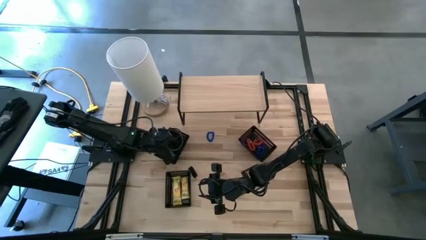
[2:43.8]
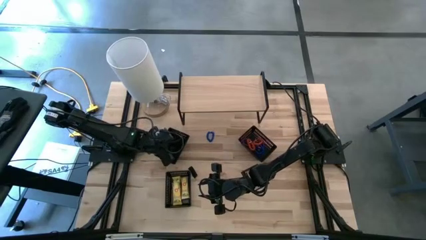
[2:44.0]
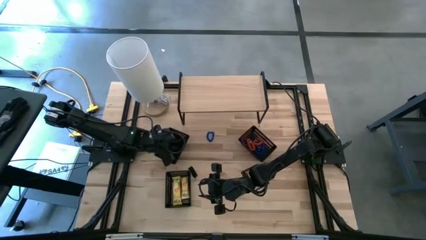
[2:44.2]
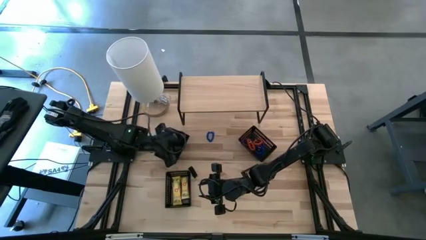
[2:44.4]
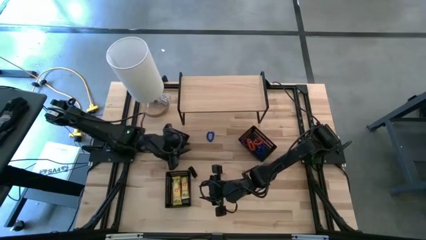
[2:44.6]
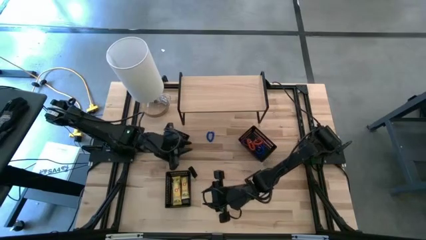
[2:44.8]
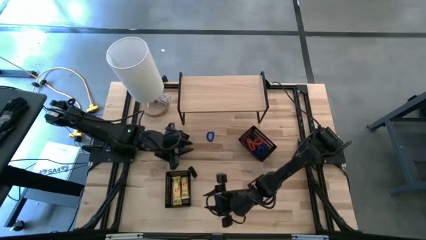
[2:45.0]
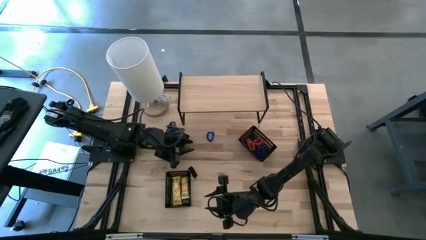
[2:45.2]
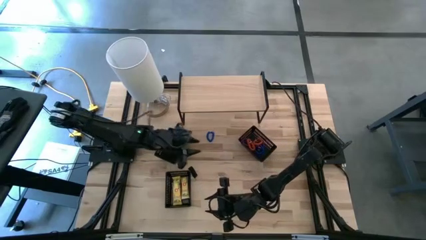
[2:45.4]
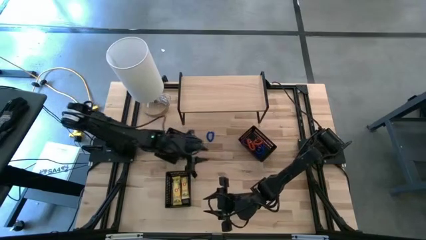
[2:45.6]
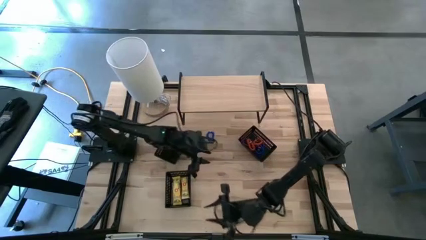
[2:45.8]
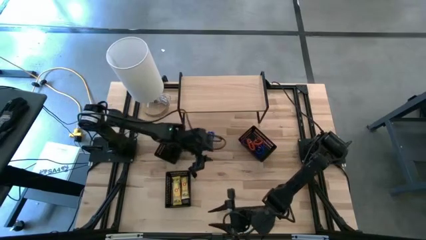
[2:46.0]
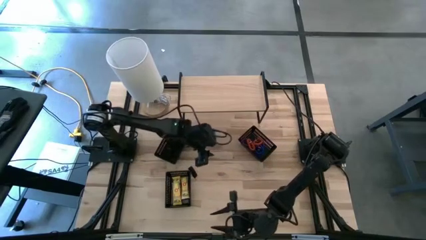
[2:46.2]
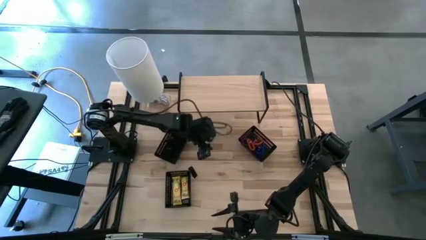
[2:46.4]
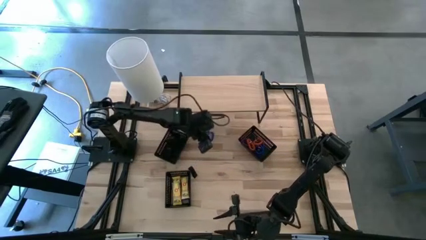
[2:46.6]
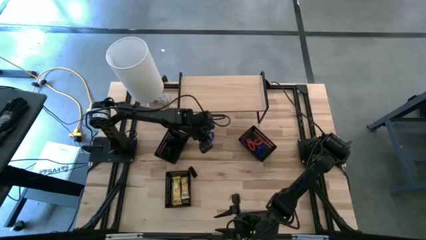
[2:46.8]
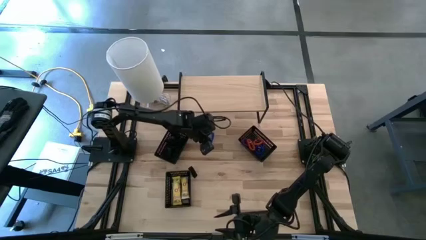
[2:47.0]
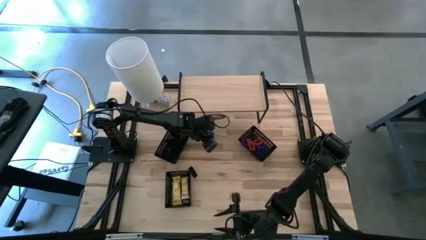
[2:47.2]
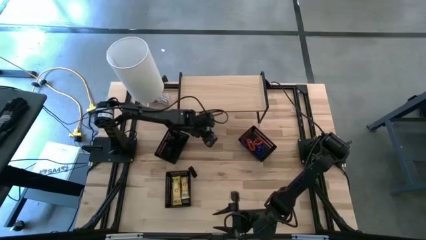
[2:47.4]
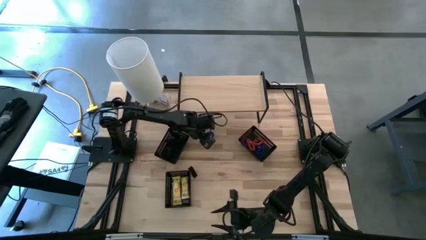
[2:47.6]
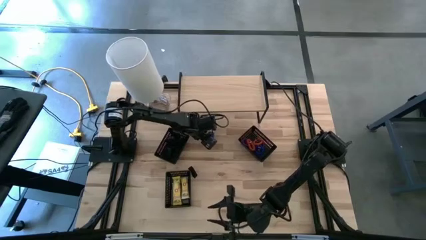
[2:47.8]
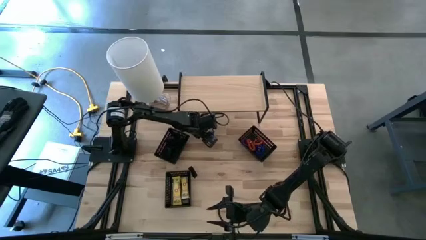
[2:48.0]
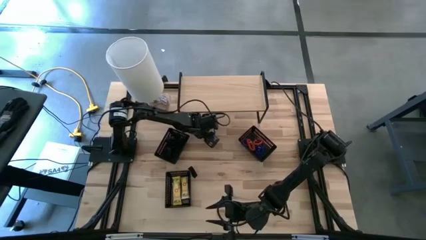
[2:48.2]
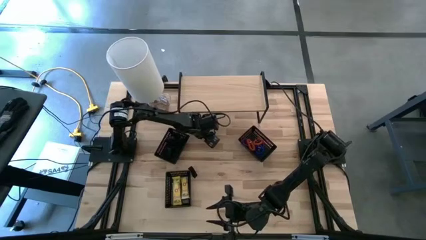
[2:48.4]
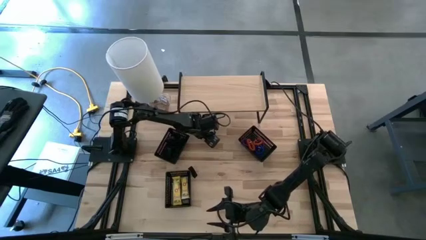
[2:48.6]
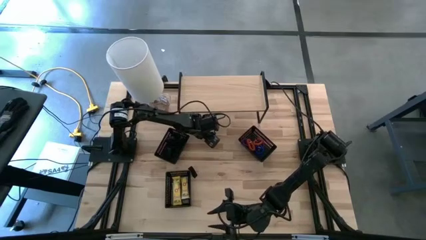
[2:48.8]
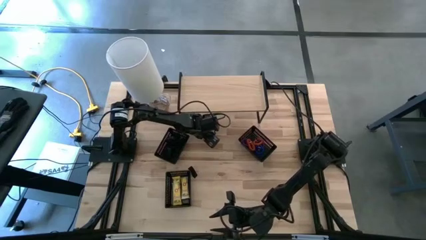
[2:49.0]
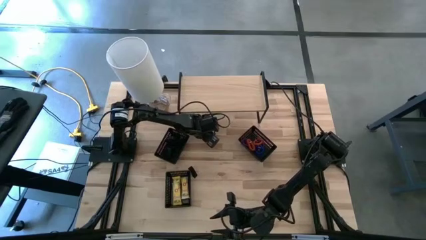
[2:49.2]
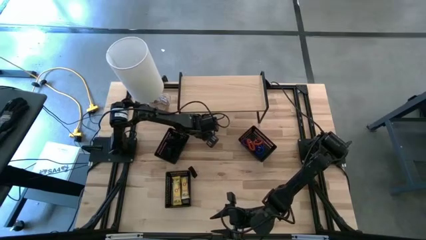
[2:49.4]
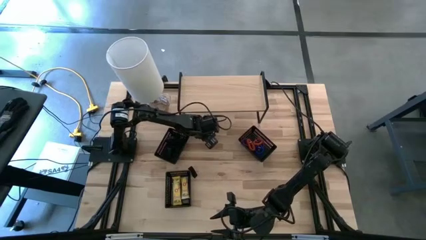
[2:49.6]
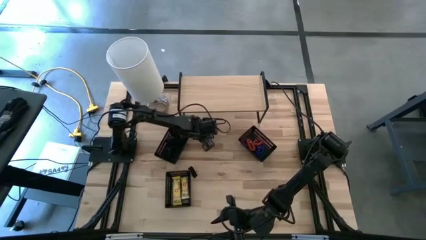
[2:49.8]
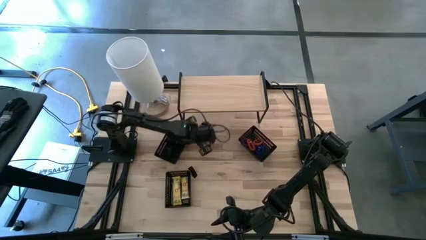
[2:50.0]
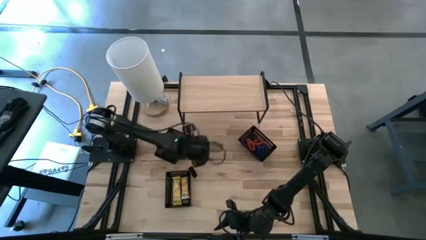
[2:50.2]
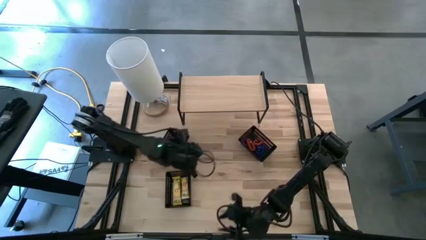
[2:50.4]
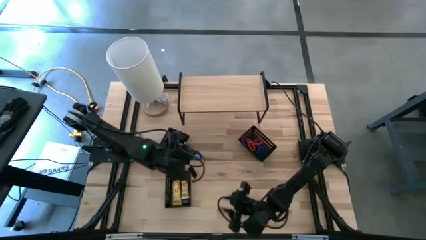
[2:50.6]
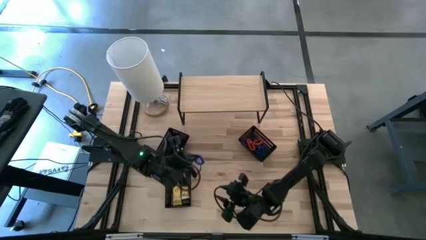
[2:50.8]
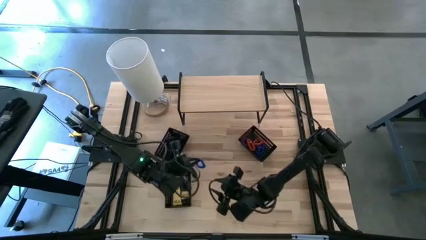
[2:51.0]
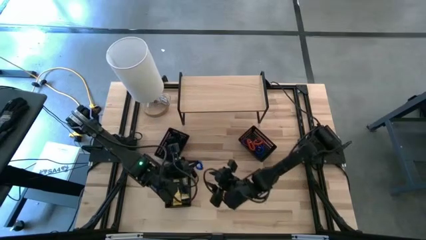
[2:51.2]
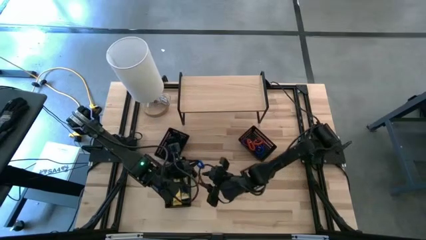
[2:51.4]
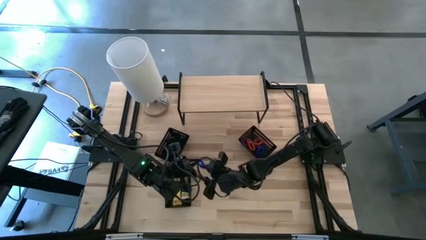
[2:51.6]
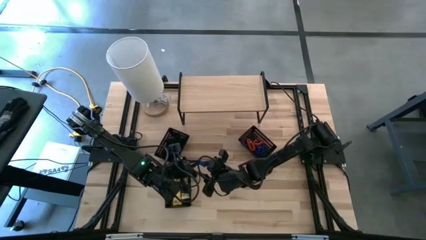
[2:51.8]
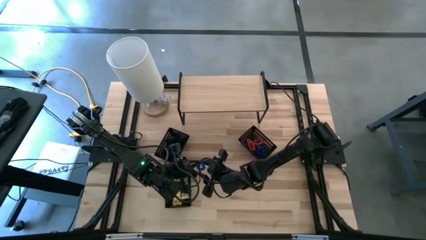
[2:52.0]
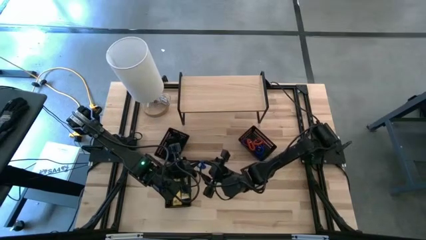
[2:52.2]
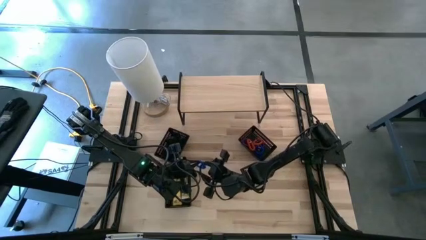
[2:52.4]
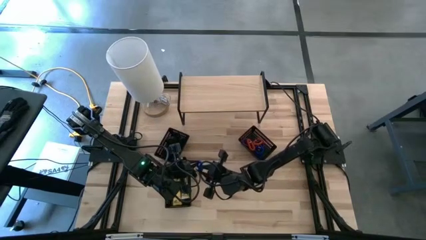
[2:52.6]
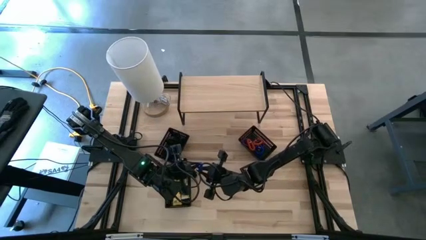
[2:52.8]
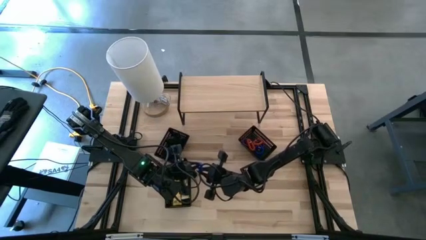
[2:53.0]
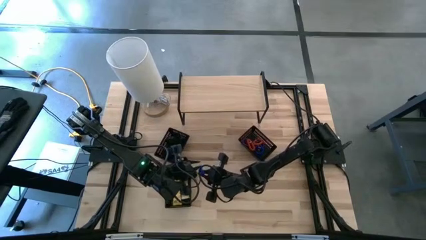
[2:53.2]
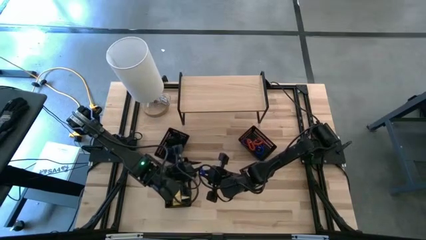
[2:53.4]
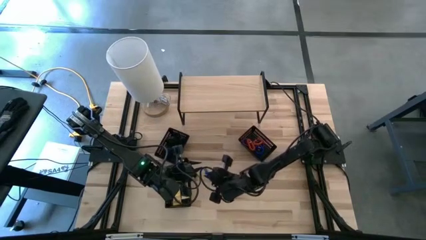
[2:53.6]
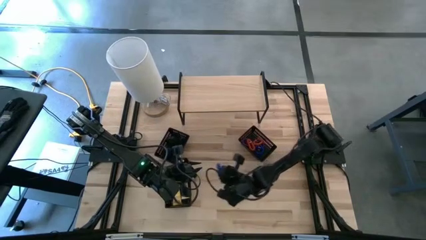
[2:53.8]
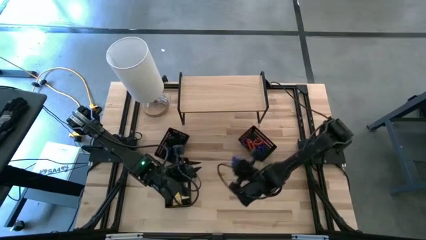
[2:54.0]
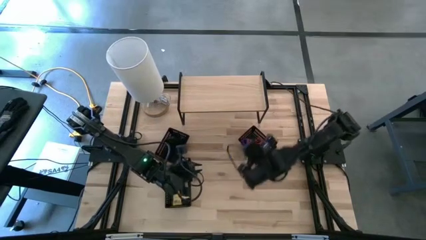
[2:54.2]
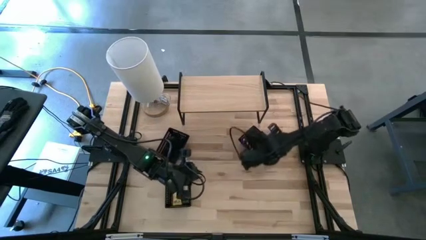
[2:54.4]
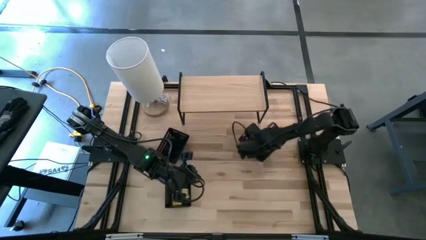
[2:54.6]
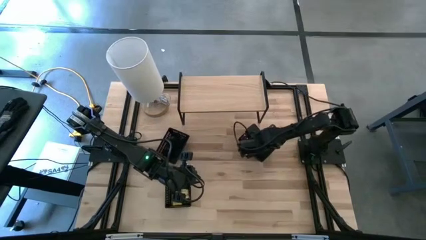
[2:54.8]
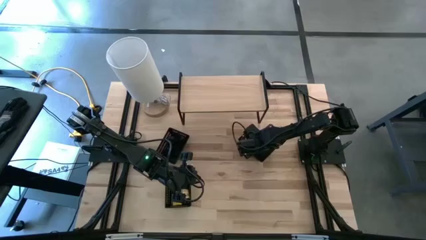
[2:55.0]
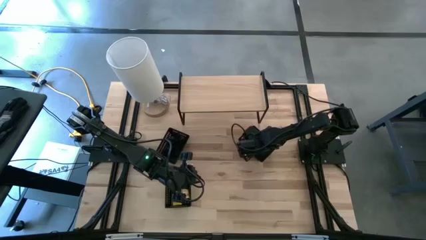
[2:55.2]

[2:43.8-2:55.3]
Task: Pick & Place Office Desk Supplies
Put the blue spring keychain into the top right black bin

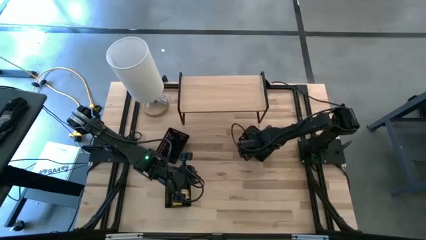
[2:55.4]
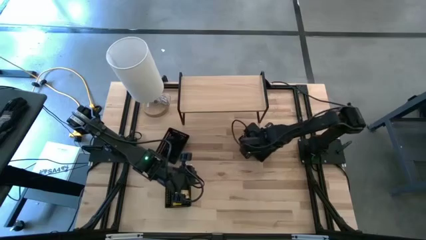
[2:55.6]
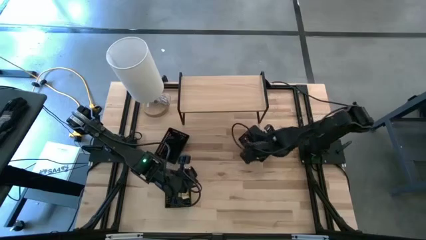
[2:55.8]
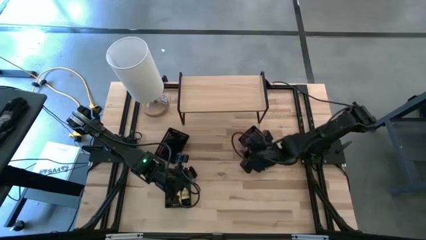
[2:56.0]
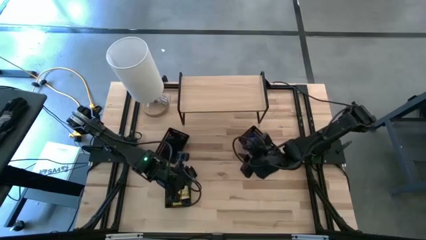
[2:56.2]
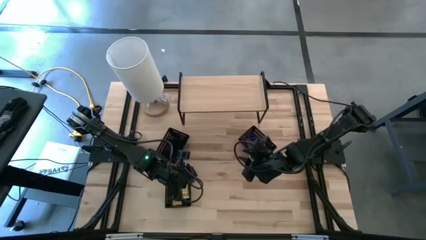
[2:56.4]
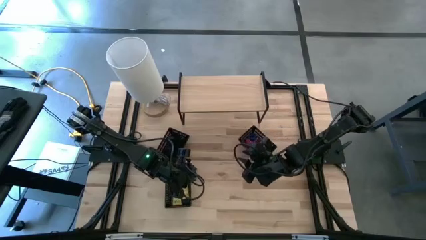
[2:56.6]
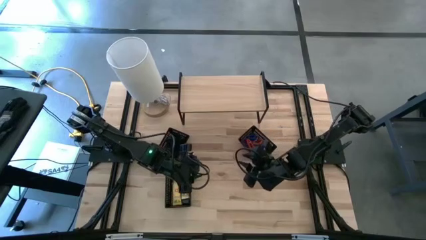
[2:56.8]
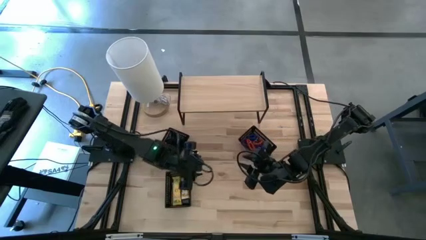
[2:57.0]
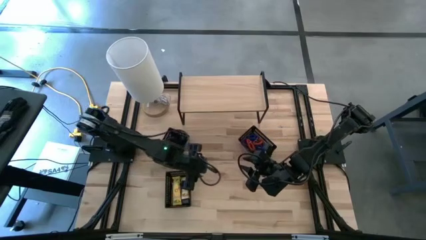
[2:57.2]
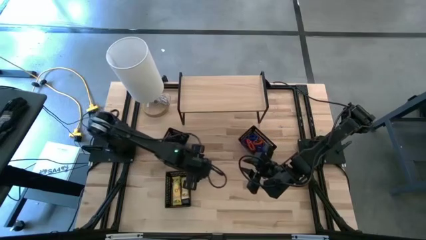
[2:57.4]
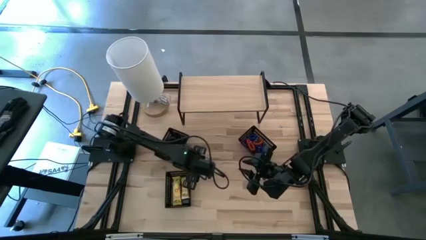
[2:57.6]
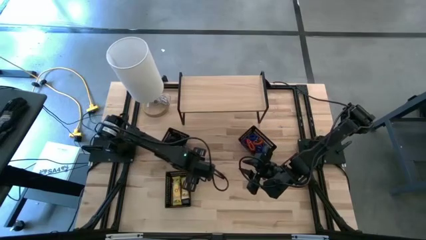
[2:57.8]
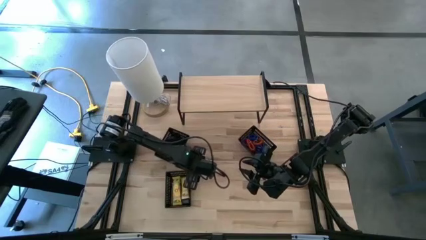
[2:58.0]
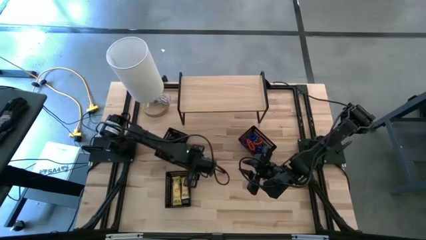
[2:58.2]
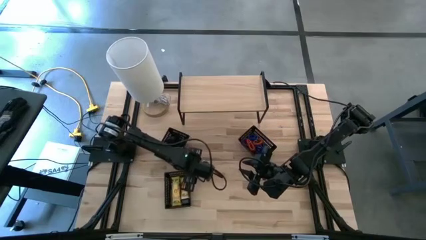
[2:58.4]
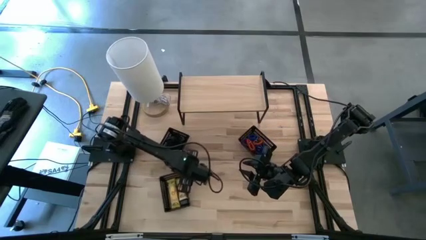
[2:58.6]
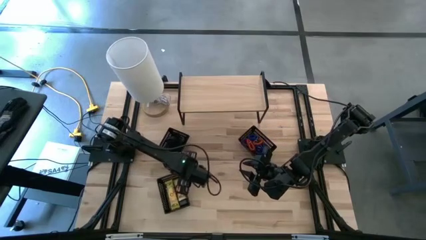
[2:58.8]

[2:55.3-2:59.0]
Adjust the bottom black bin
